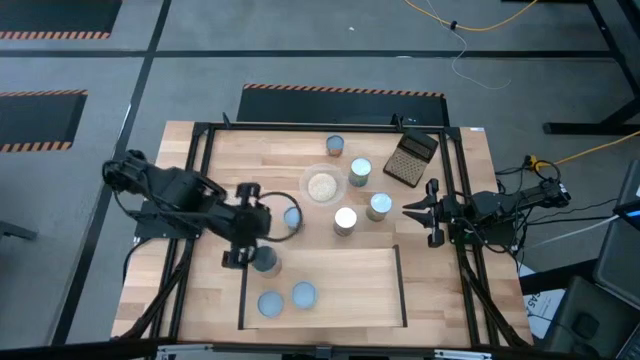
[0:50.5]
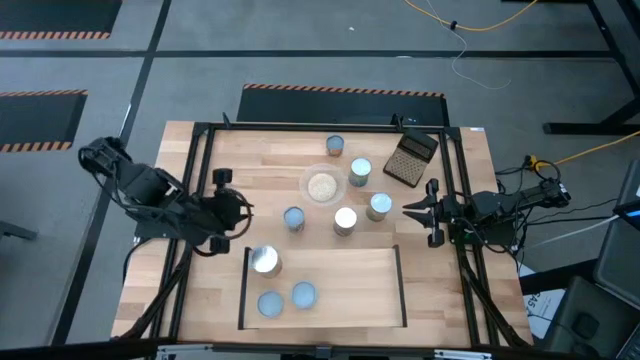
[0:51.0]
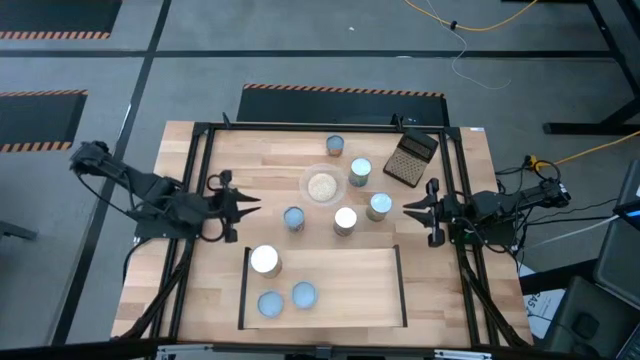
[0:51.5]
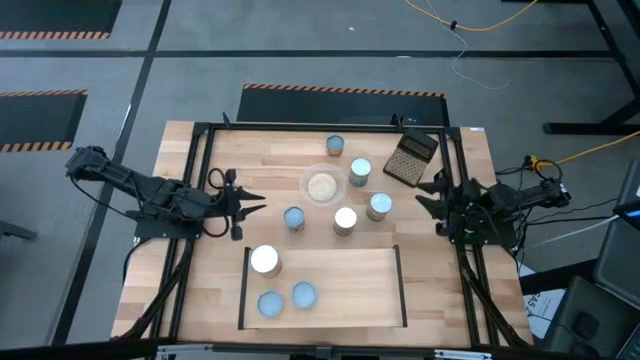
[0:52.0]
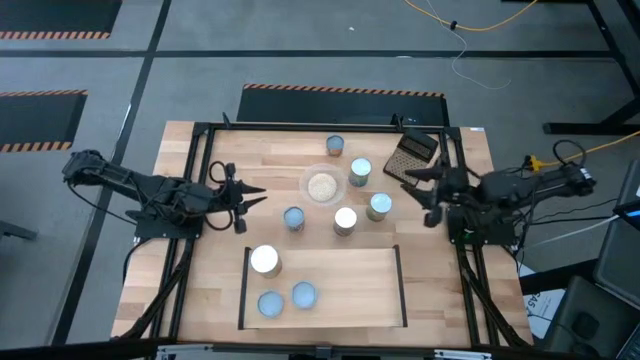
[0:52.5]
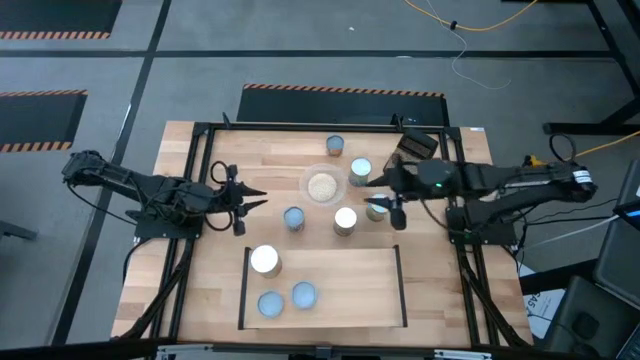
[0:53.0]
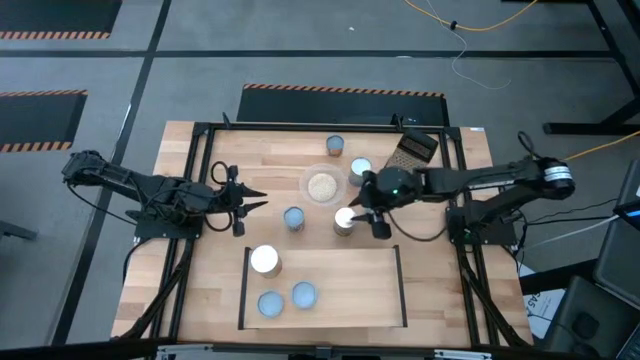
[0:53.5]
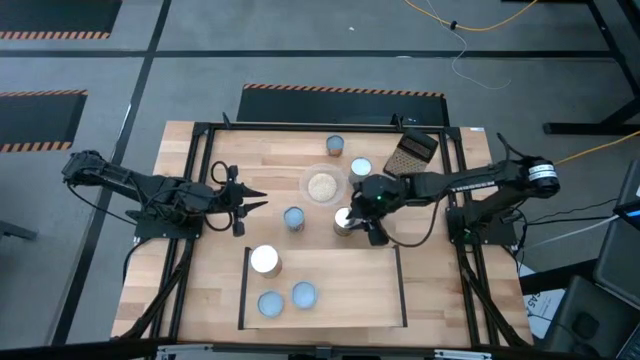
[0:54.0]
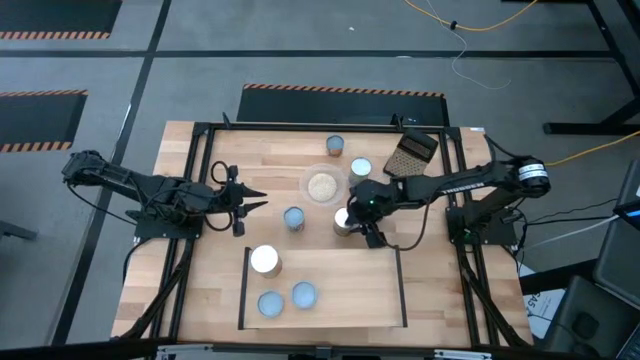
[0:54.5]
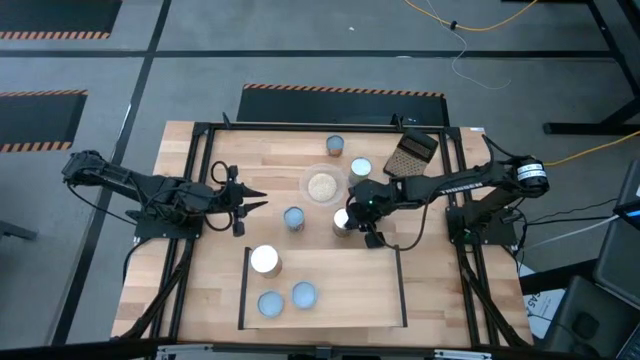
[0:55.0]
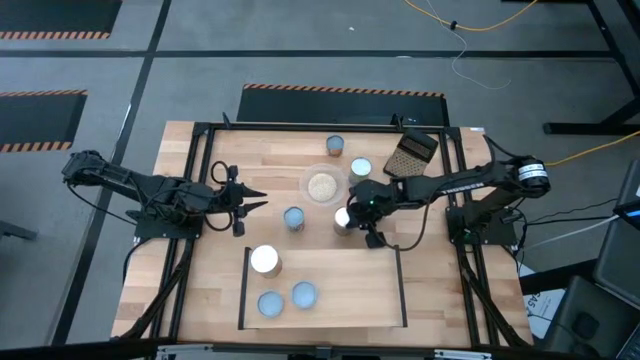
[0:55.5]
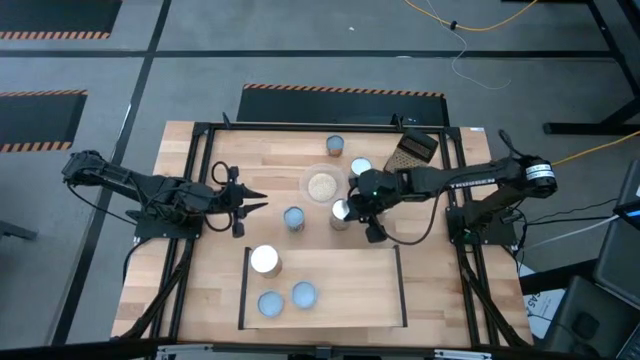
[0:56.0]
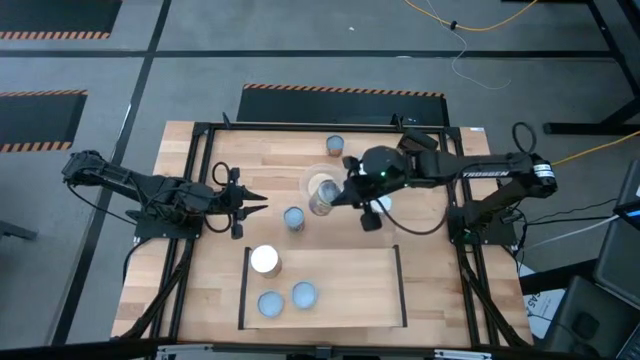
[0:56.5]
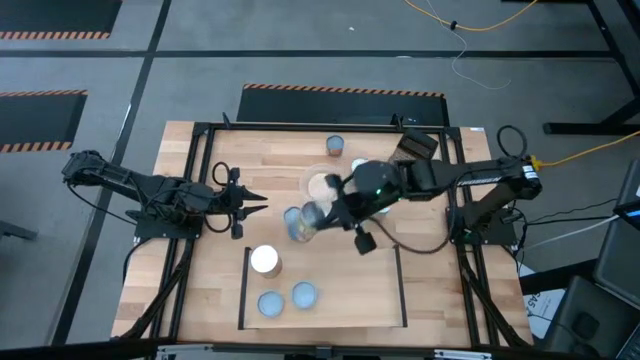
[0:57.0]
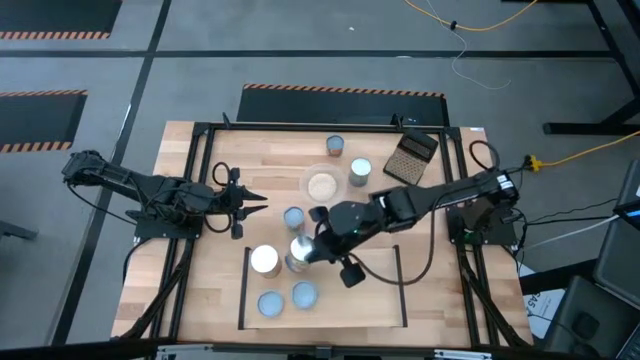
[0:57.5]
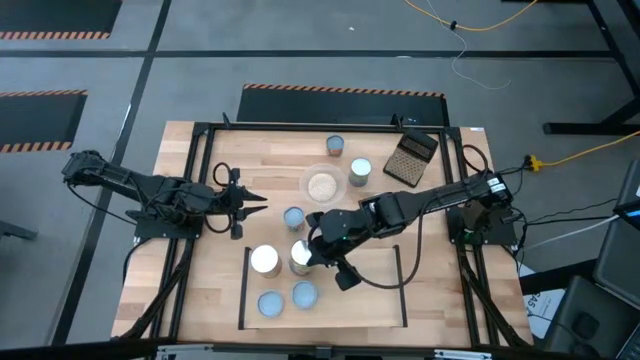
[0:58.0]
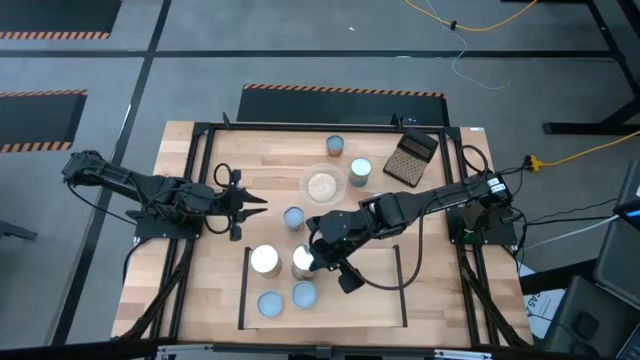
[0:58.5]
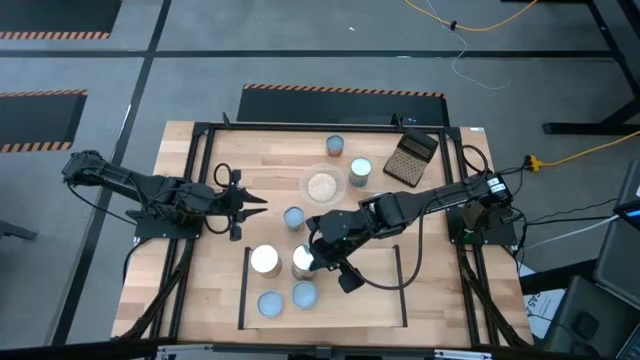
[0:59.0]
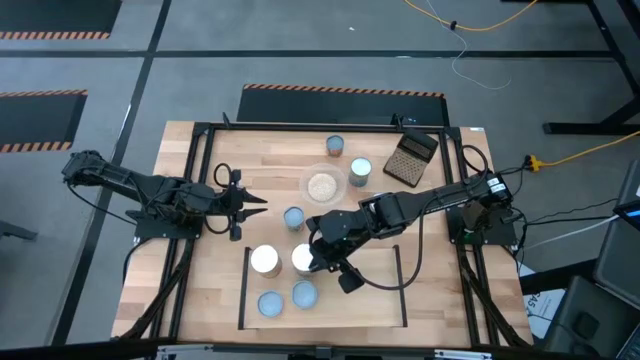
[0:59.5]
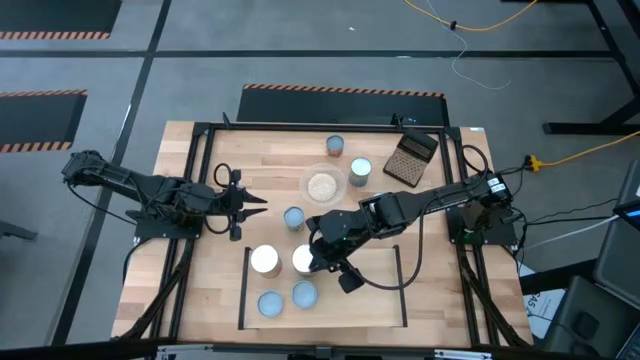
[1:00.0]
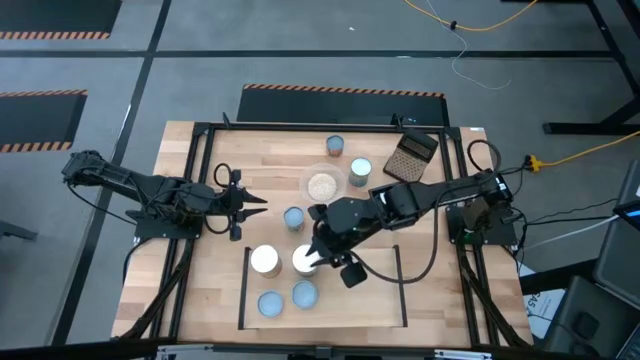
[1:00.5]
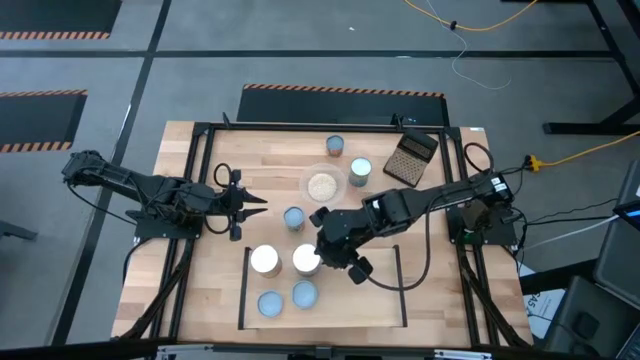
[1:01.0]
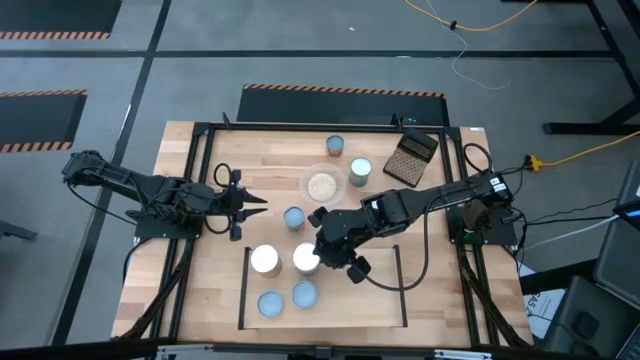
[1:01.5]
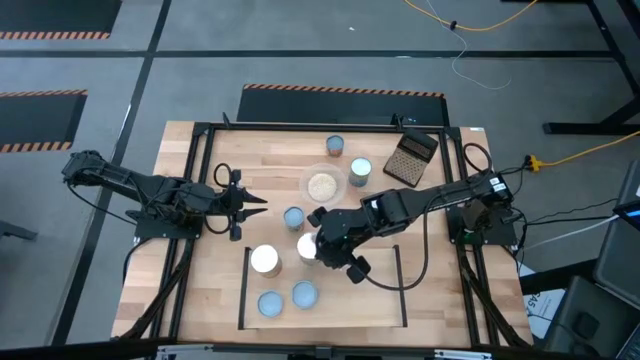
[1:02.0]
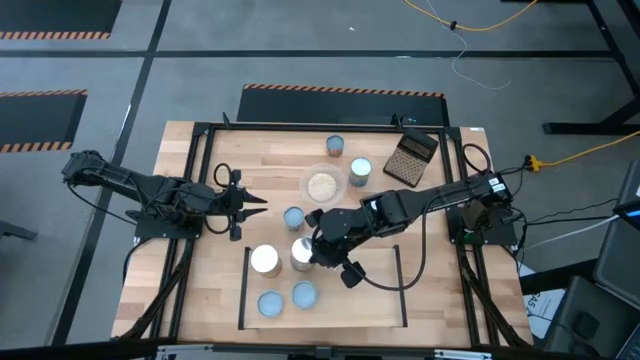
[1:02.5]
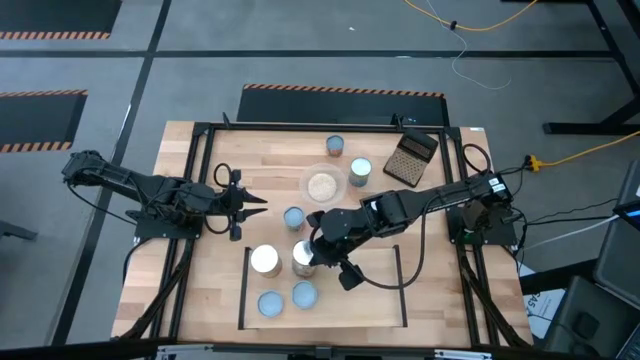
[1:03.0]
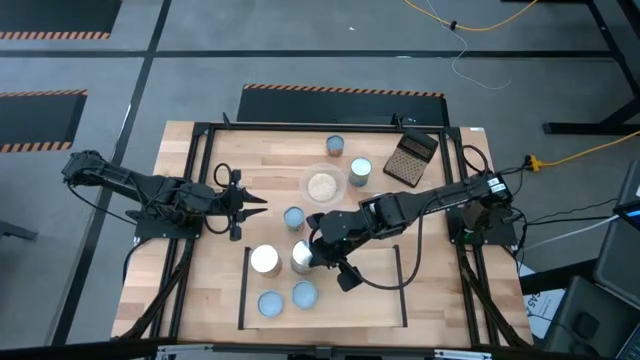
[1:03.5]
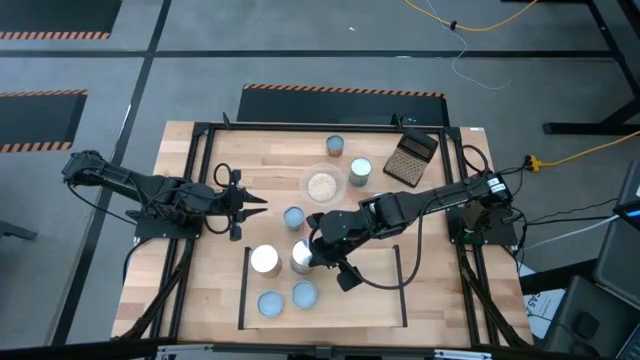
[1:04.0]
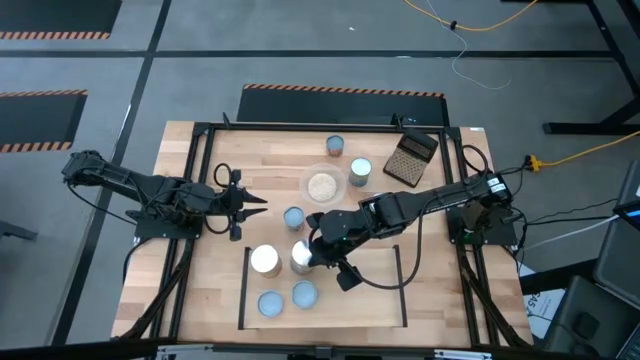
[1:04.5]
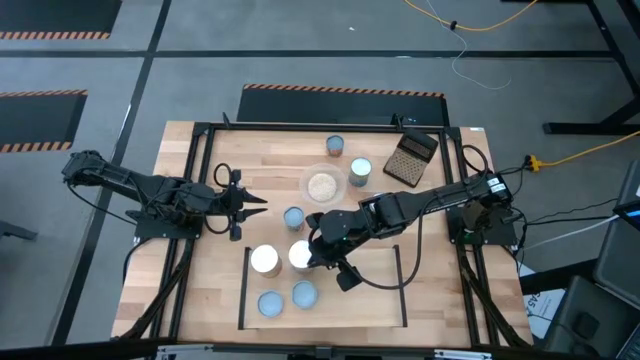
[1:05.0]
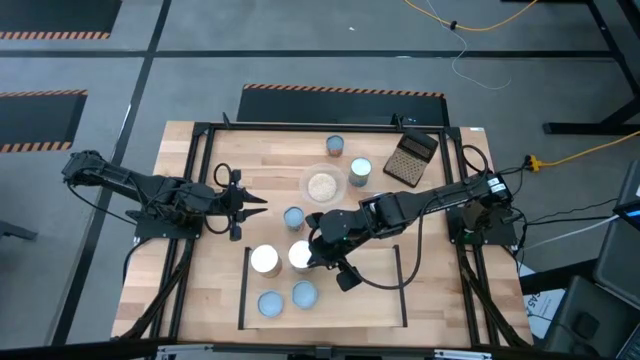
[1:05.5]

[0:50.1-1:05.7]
Task: Pick and place cans onto a shelf
Put the large canned peaches on the shelf

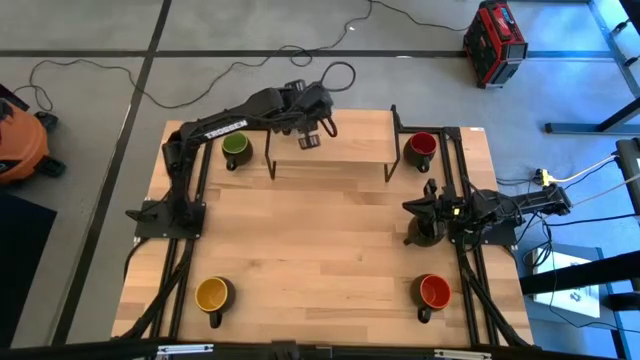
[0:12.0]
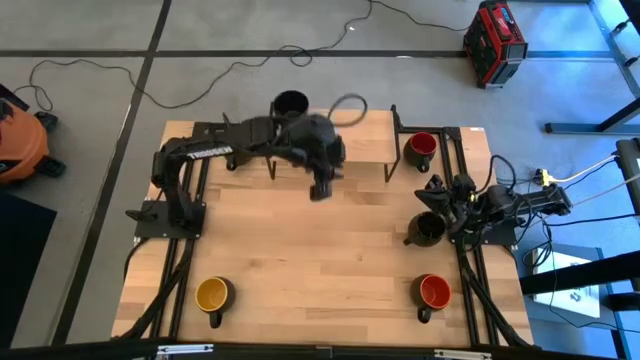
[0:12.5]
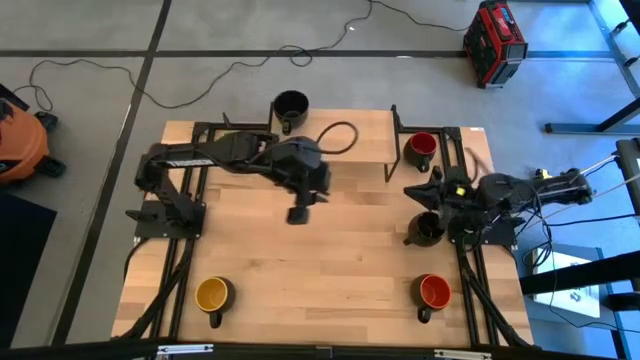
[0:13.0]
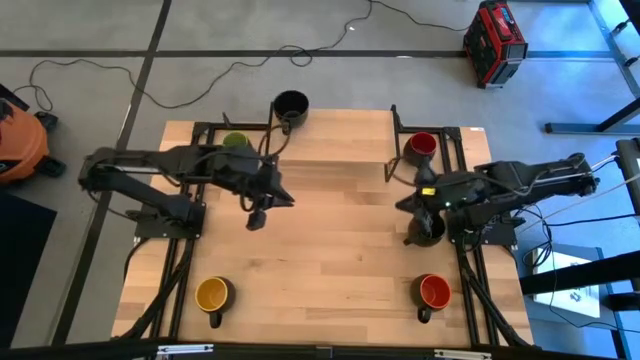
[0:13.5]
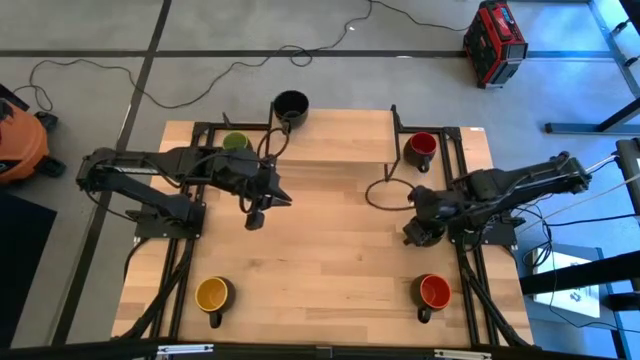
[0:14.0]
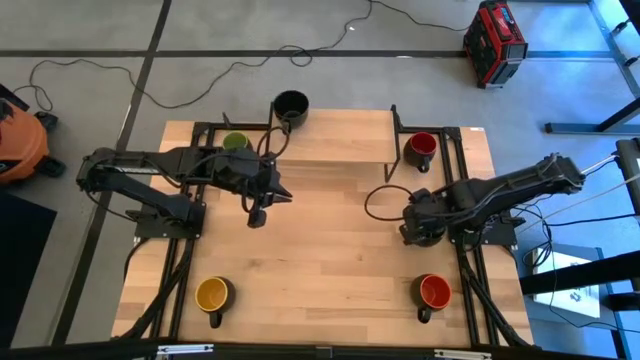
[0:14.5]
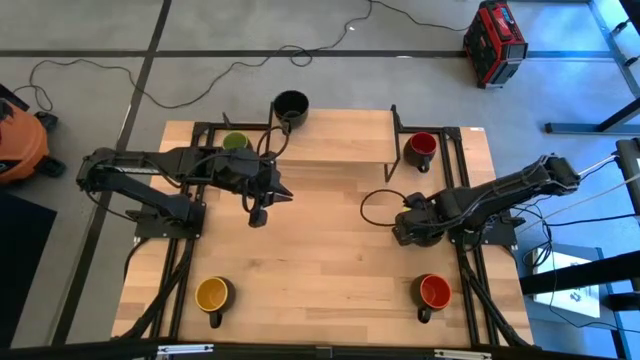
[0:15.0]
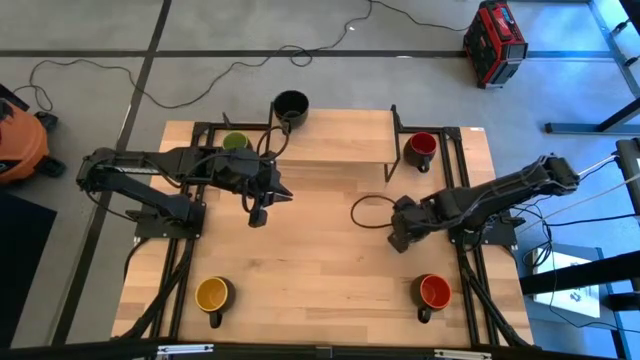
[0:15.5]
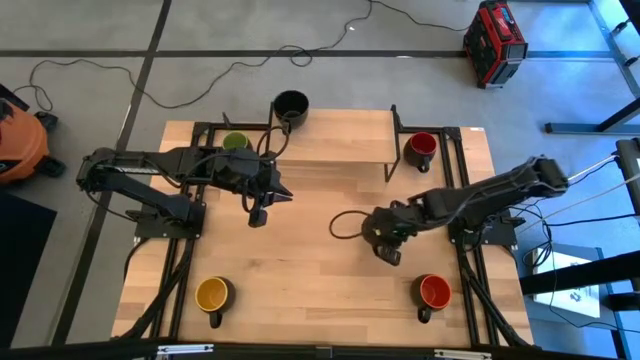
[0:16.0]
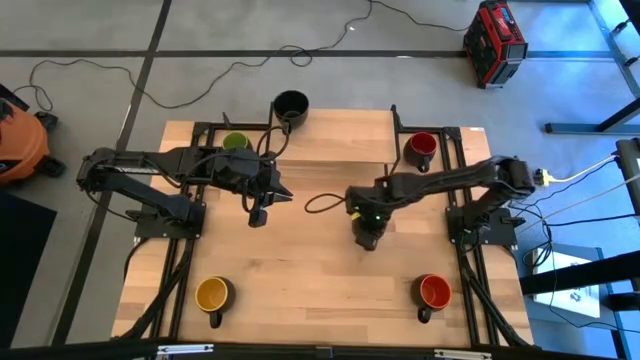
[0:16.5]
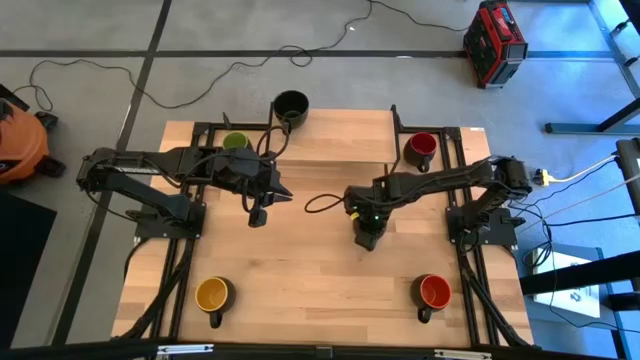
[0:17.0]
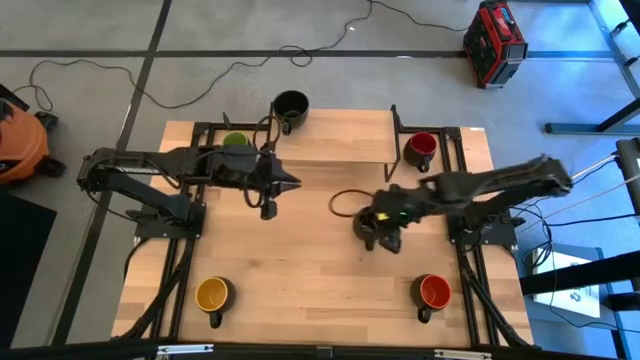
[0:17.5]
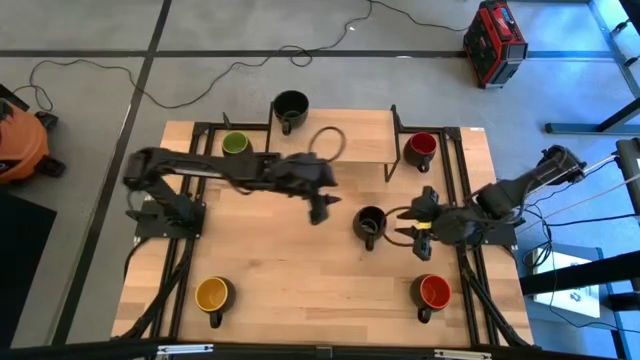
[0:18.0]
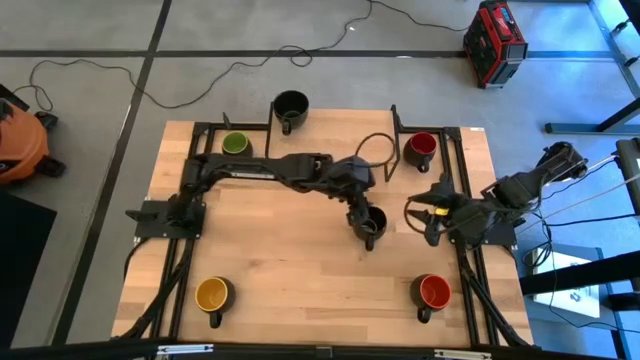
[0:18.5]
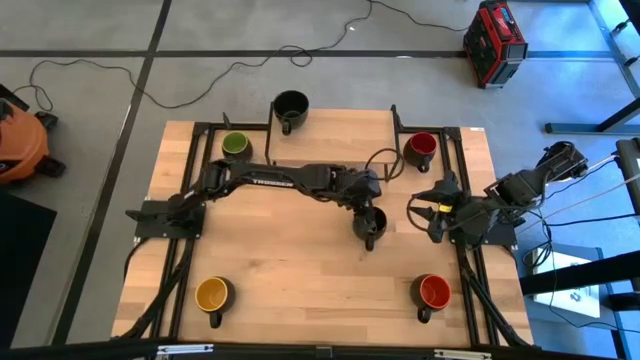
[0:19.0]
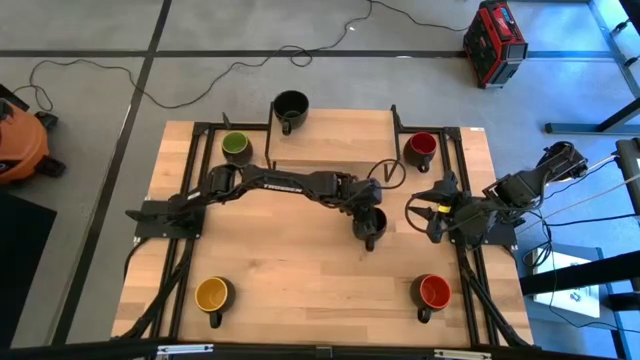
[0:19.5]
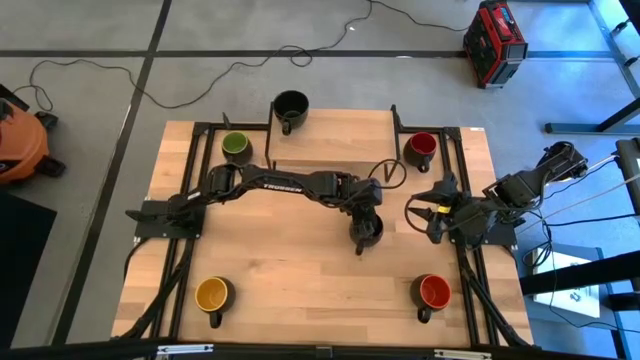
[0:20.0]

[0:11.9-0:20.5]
Task: Place coffee mugs
Move the black mug to the left center of the table
